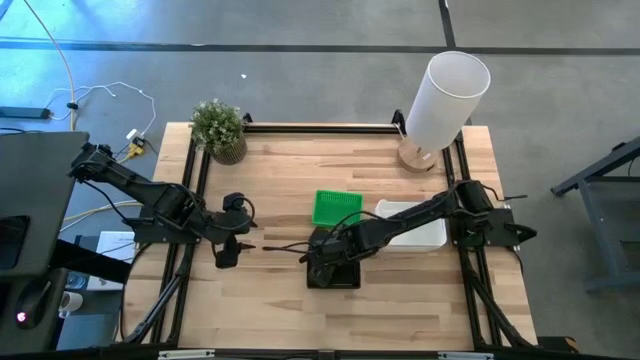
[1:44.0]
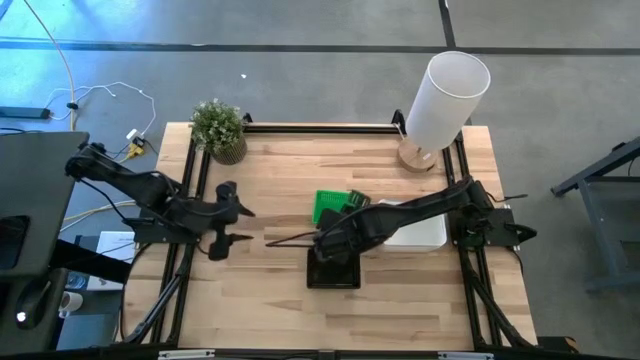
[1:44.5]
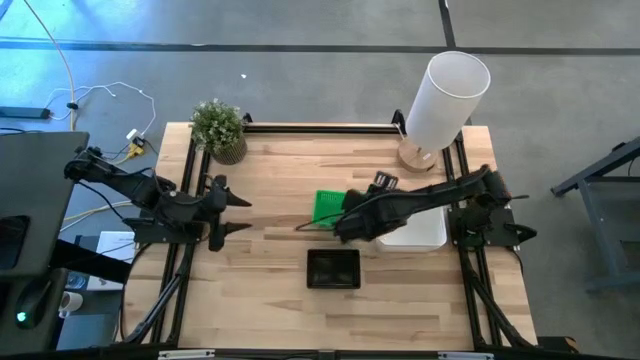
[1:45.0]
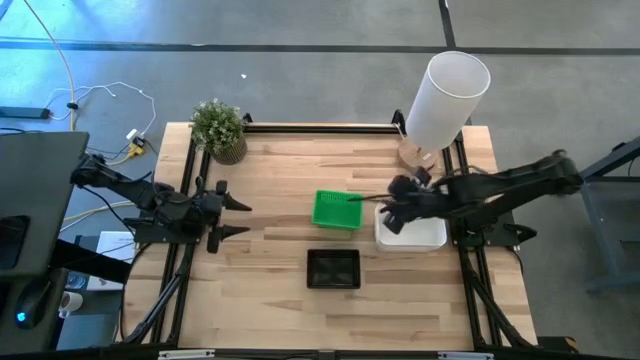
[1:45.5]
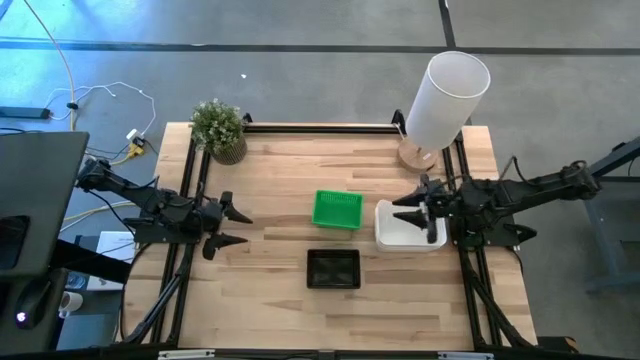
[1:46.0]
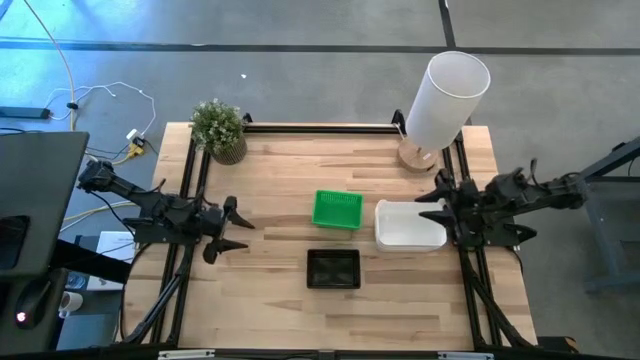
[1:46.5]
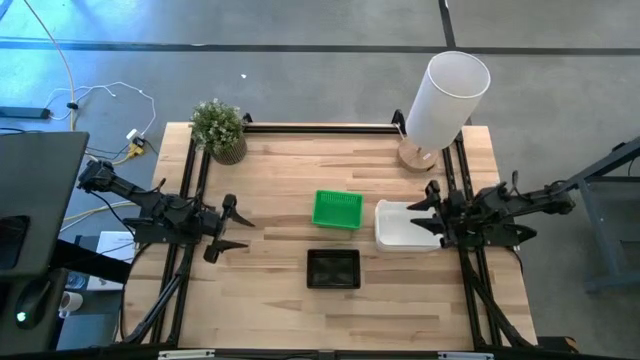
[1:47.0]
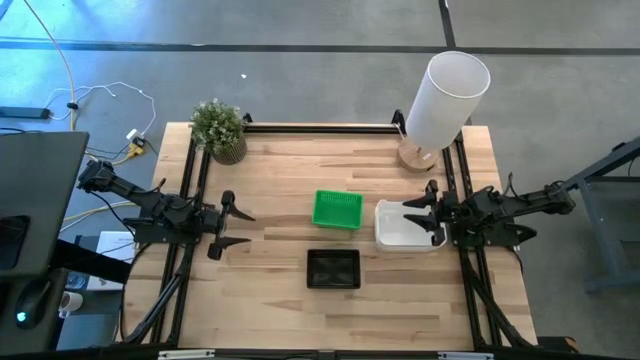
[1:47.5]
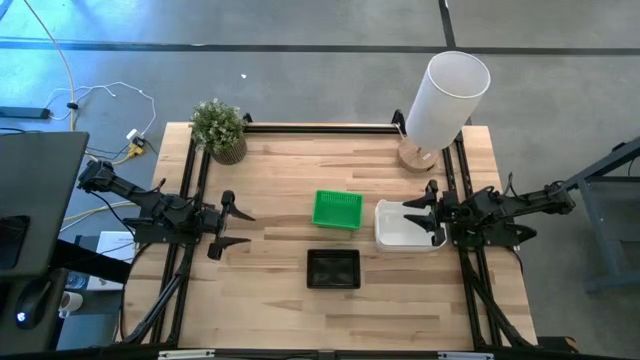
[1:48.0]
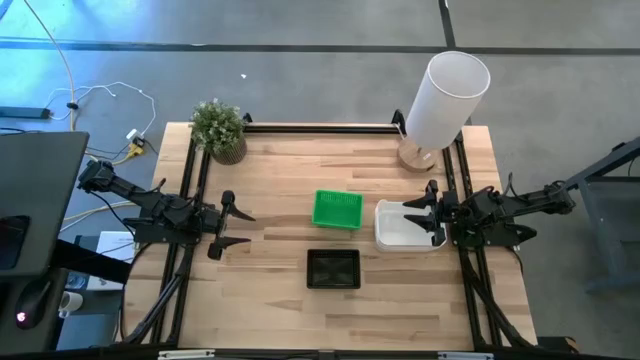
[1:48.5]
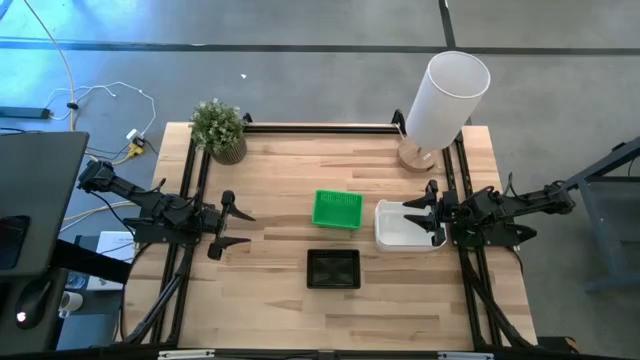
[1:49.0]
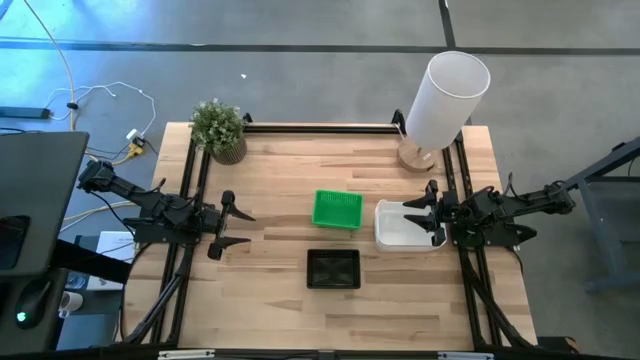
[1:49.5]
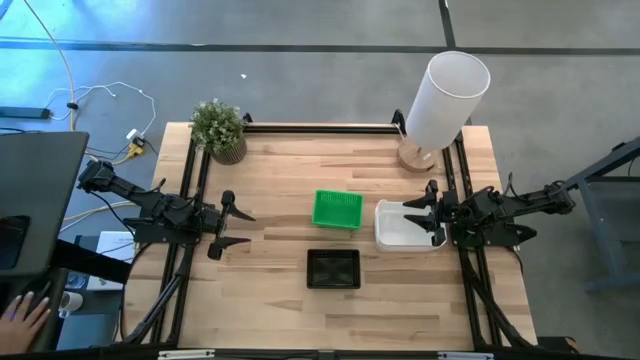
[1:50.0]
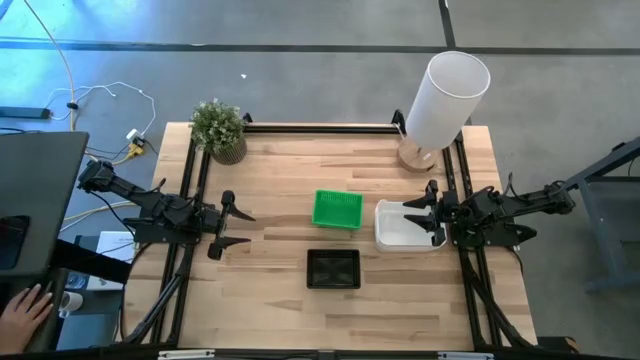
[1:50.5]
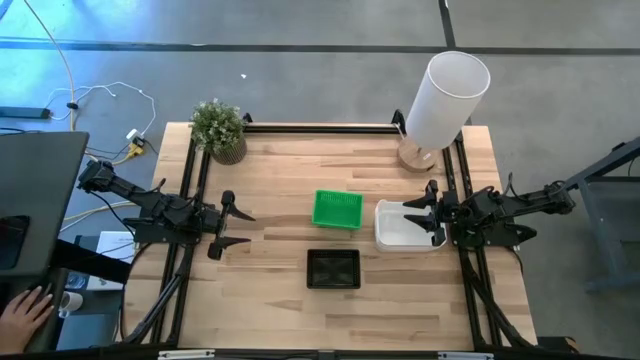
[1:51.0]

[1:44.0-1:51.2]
Return to Home Position
